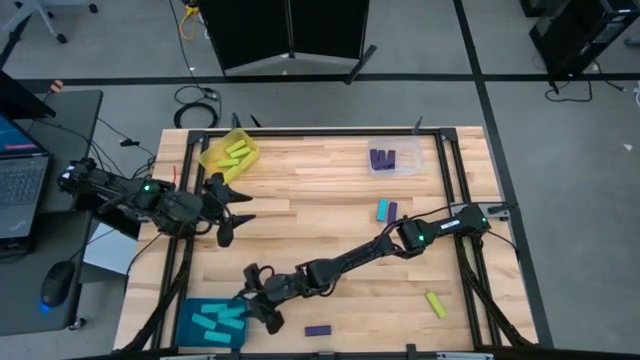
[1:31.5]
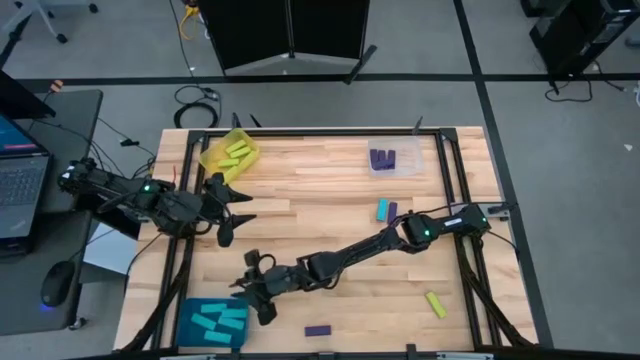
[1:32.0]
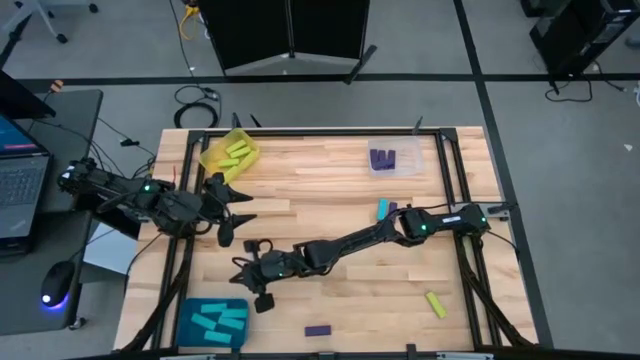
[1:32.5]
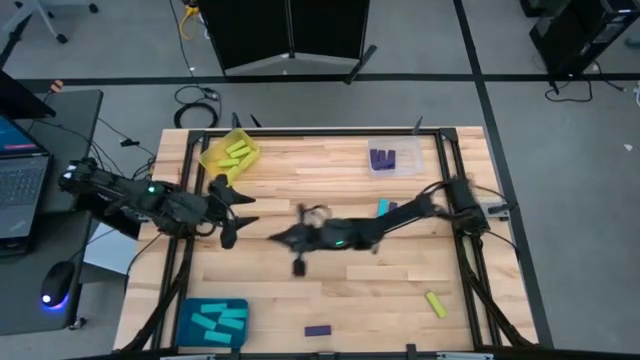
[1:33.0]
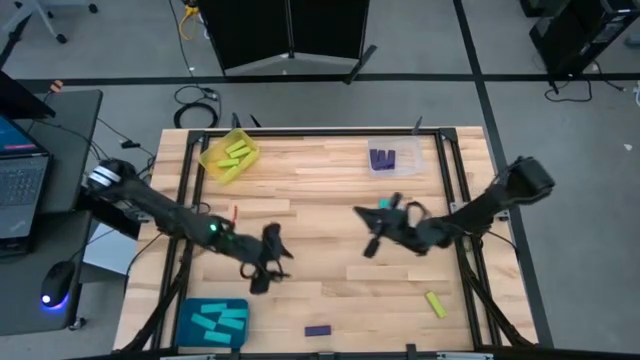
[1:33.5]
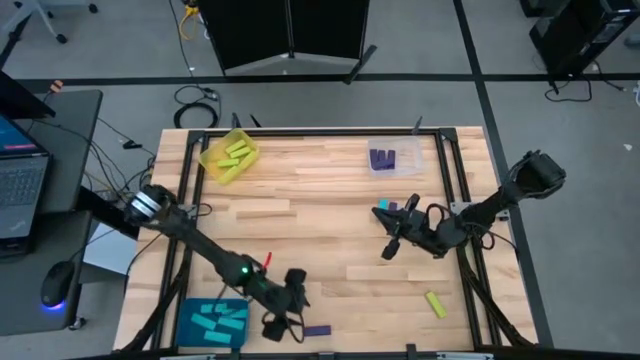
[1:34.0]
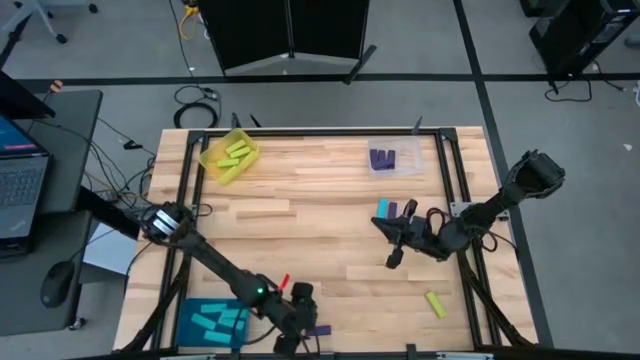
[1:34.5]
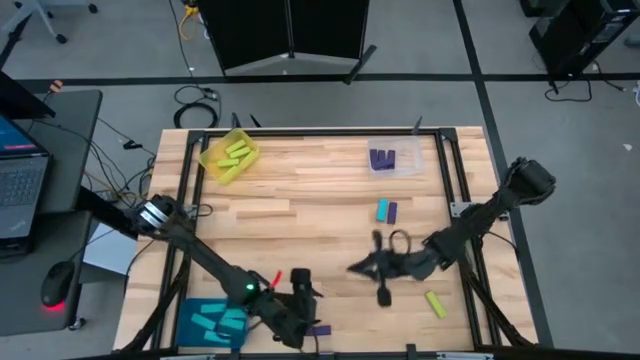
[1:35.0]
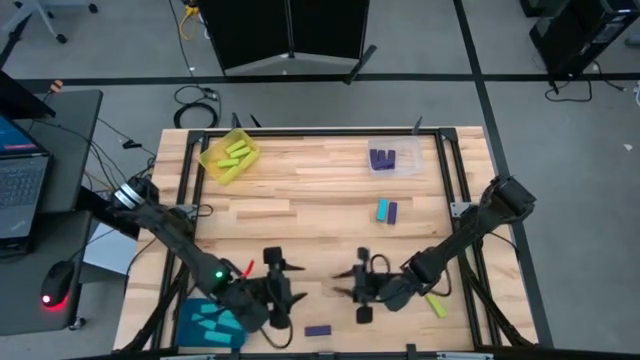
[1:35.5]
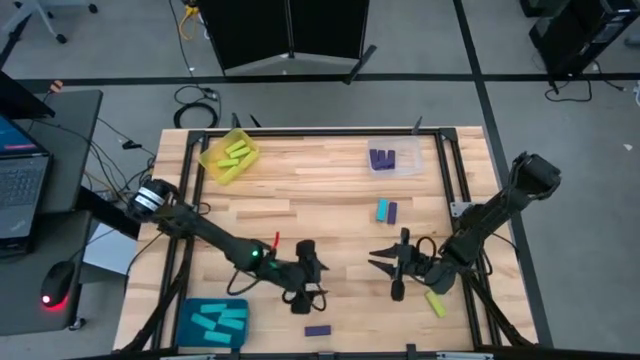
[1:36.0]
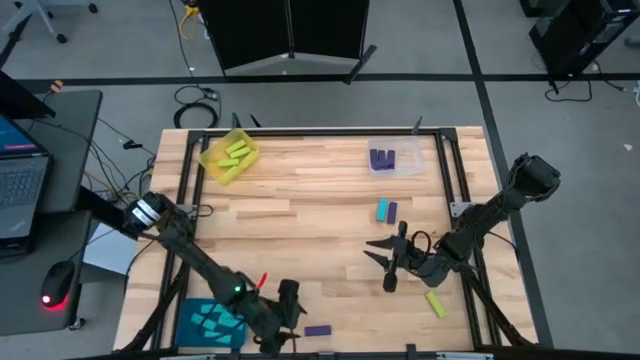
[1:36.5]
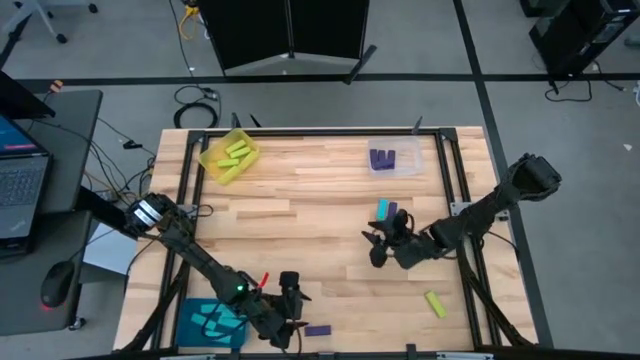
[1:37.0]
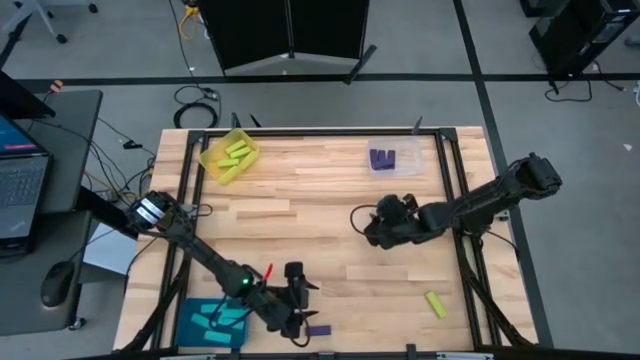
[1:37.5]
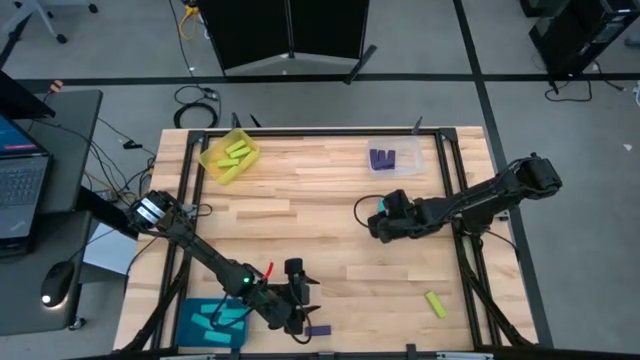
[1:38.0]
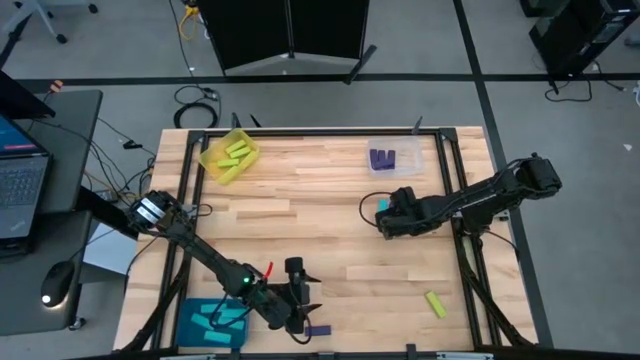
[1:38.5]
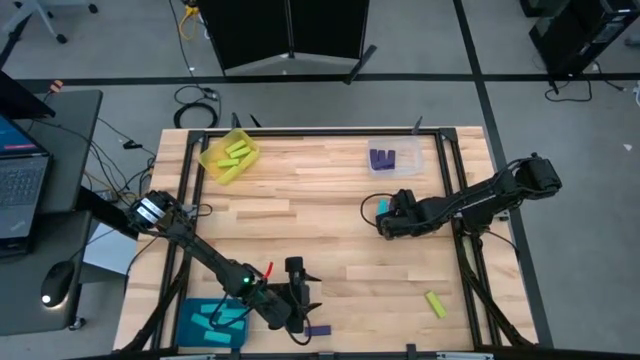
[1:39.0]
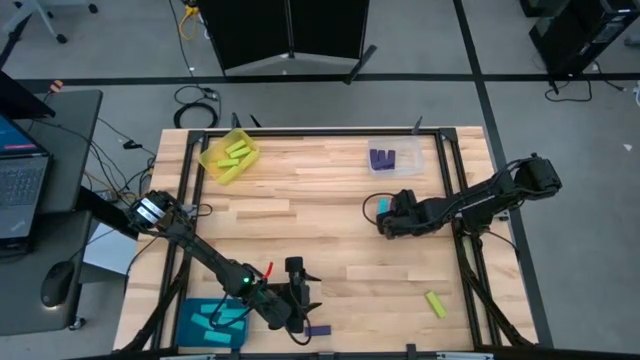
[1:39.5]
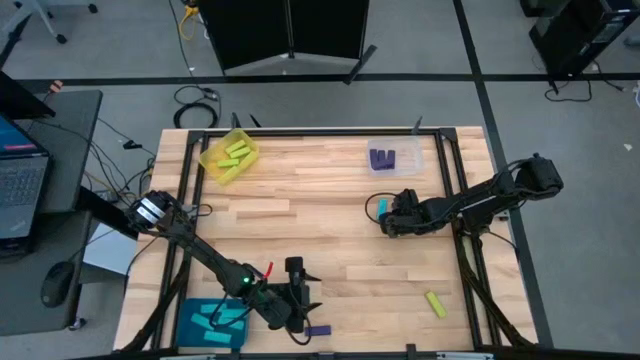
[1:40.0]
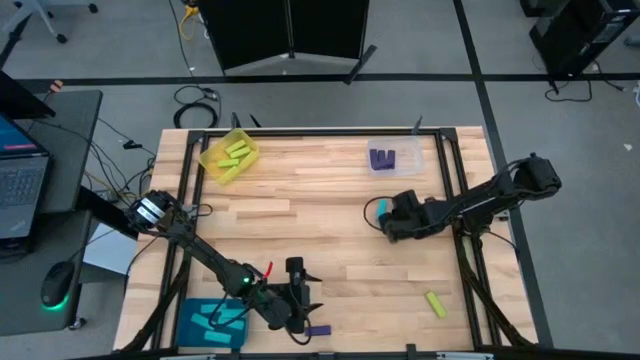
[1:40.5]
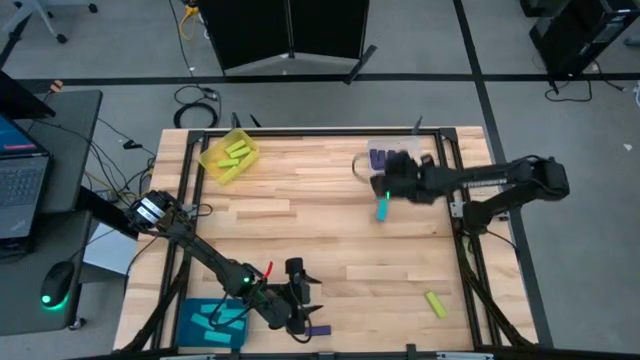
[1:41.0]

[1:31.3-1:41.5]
Task: Sort blocks
Put the purple block into the white transparent bin

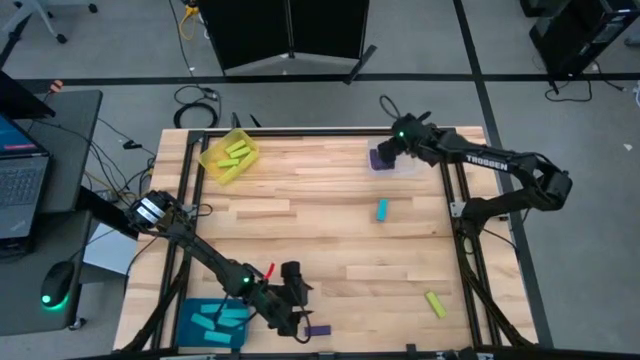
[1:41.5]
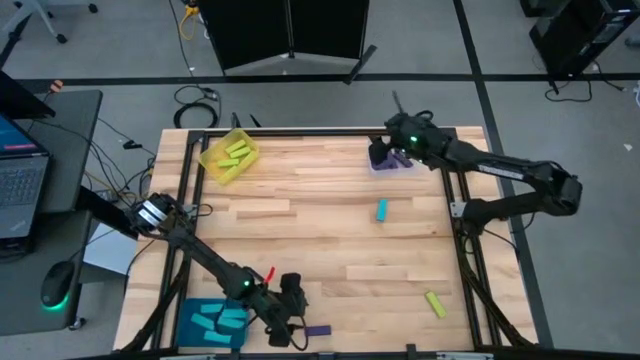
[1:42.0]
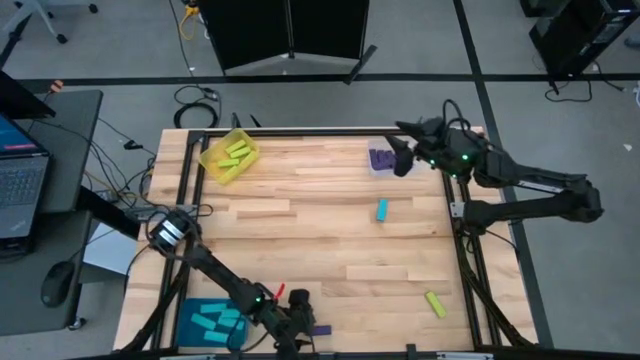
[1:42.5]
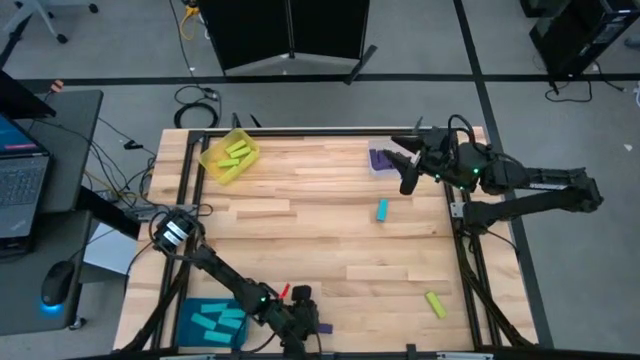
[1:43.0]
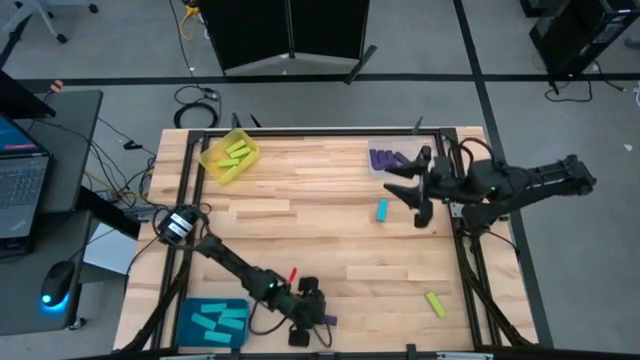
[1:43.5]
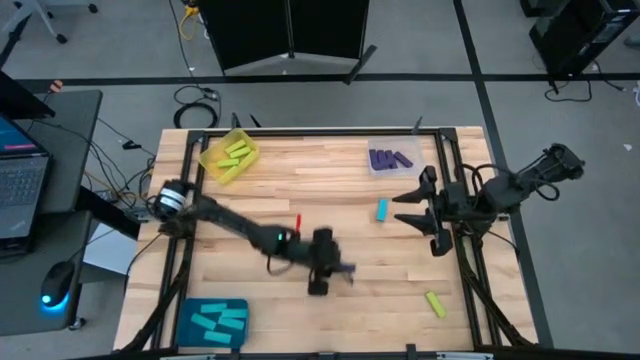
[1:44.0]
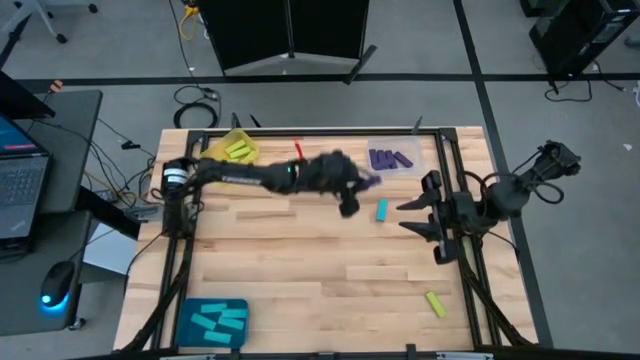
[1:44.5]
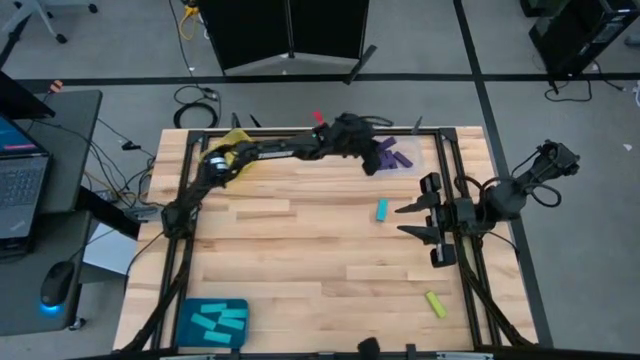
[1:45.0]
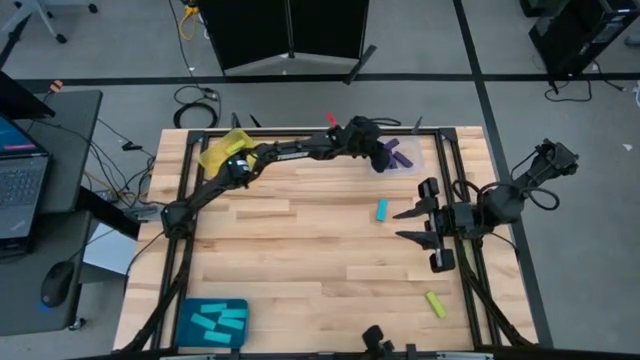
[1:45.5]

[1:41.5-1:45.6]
Put the purple block into the white transparent bin

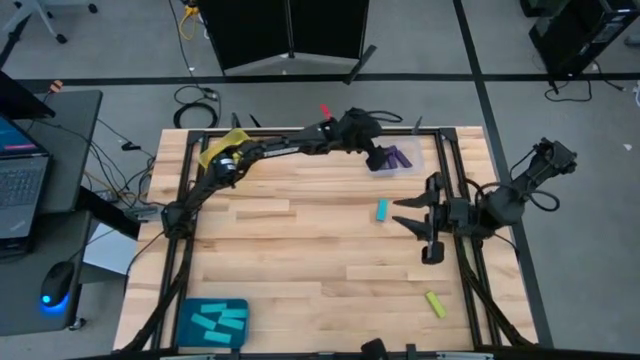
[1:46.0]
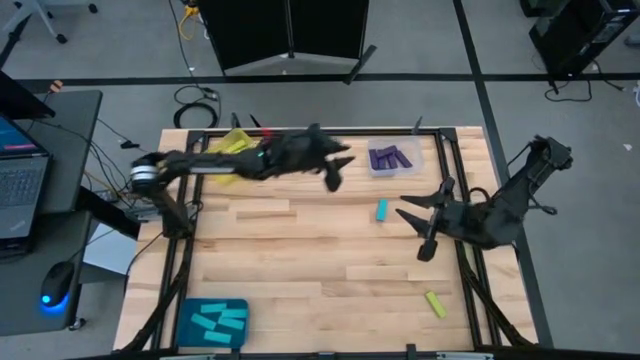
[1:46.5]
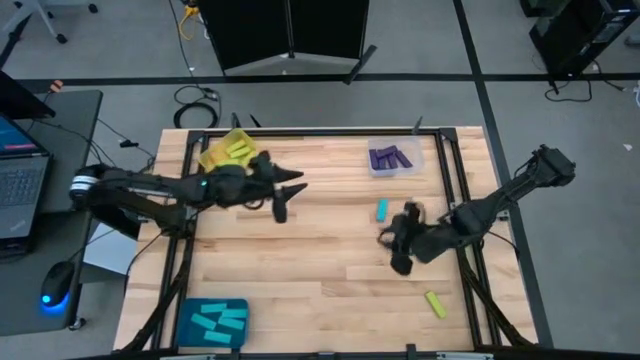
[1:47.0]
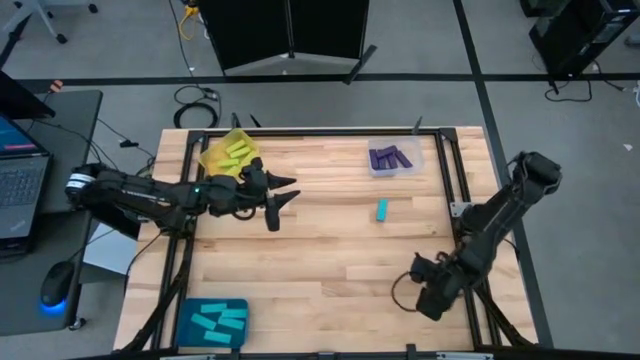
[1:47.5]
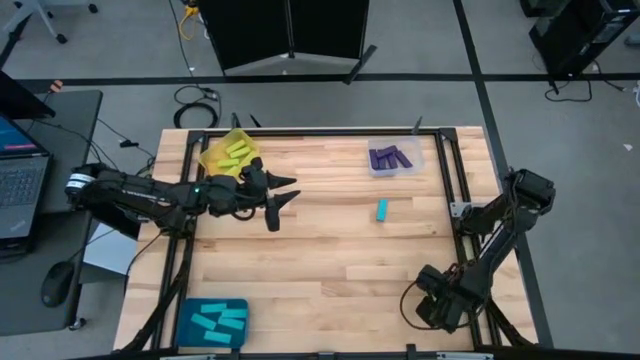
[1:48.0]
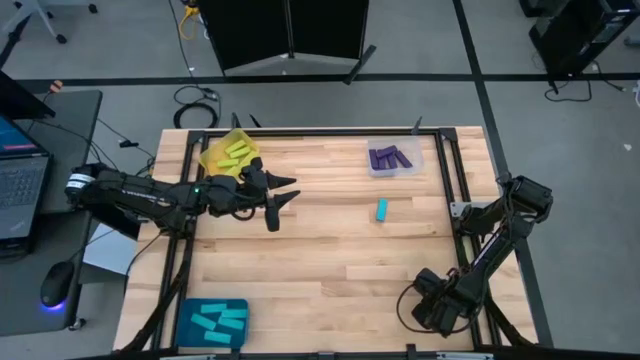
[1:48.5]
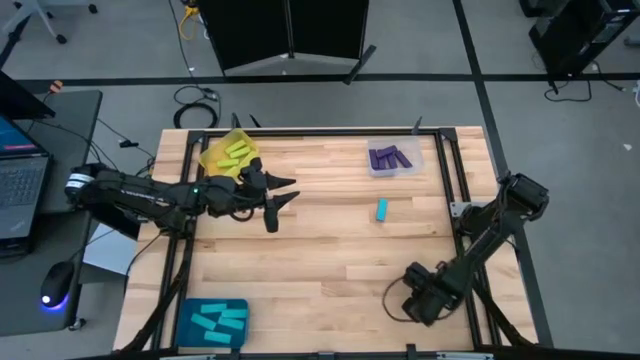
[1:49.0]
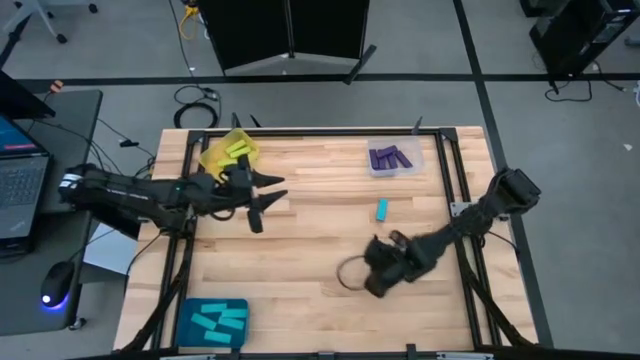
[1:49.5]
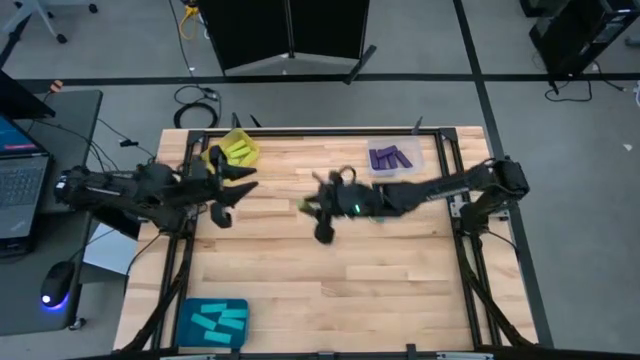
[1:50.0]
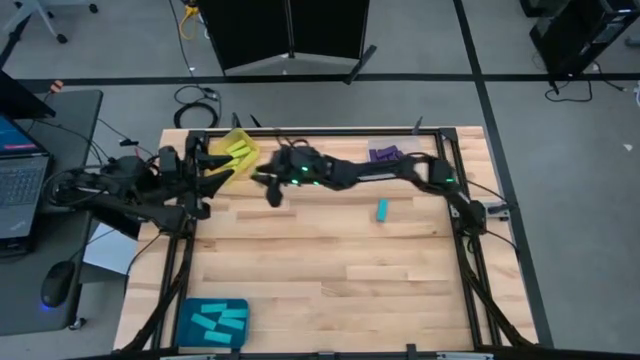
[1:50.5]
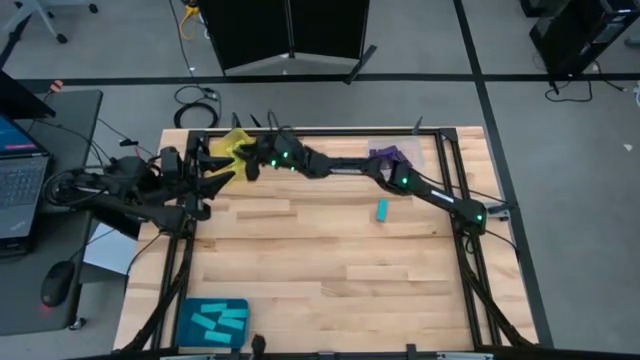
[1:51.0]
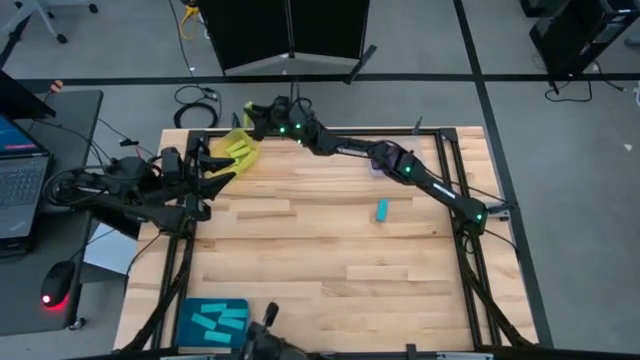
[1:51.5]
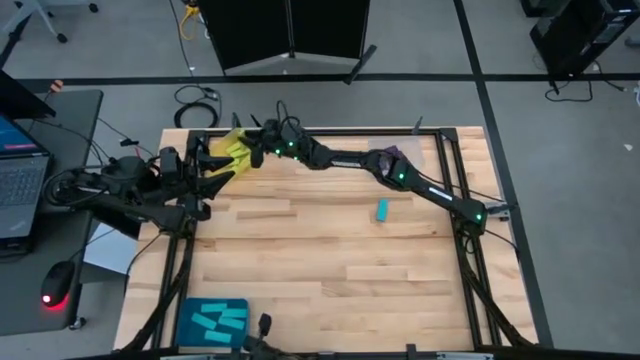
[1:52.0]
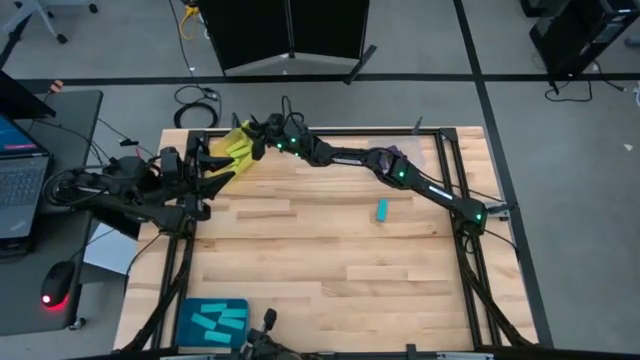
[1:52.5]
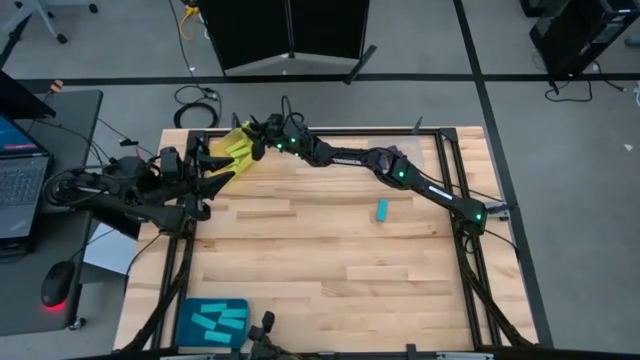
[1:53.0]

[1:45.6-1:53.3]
Put the light green block into the yellow transparent bin
